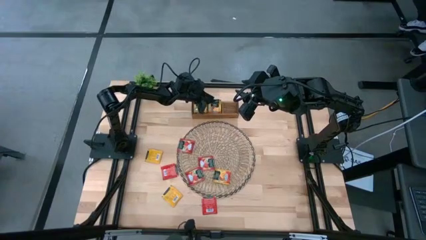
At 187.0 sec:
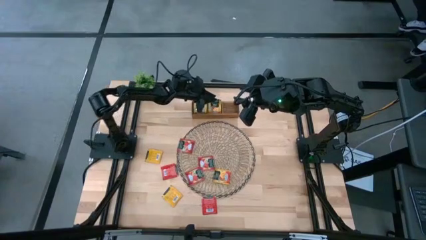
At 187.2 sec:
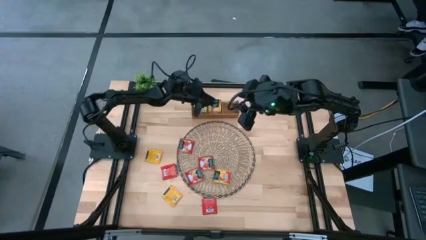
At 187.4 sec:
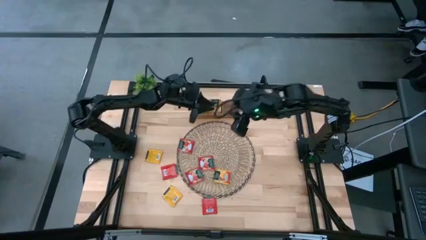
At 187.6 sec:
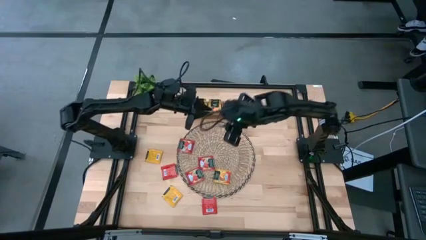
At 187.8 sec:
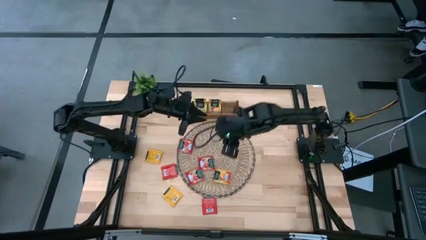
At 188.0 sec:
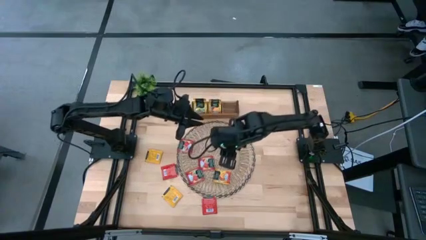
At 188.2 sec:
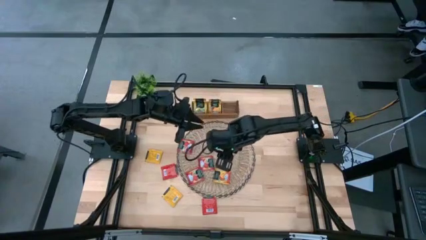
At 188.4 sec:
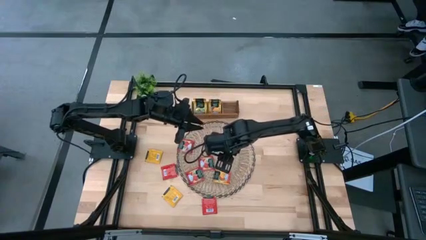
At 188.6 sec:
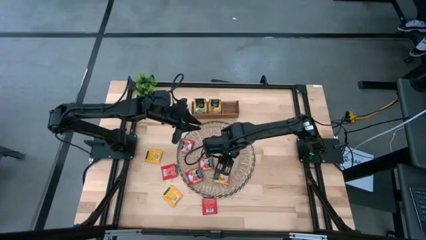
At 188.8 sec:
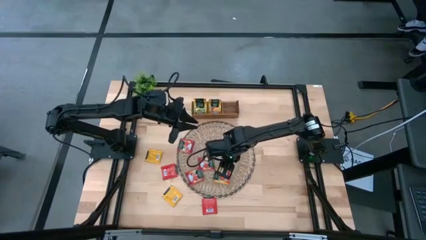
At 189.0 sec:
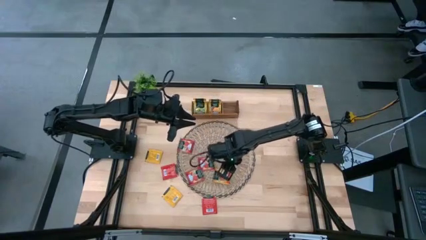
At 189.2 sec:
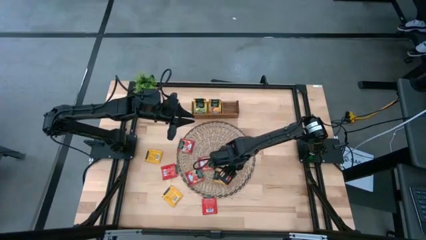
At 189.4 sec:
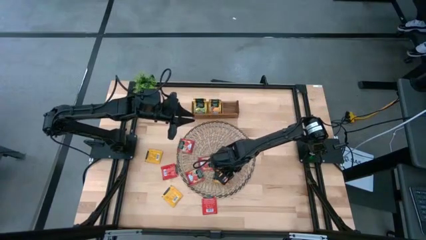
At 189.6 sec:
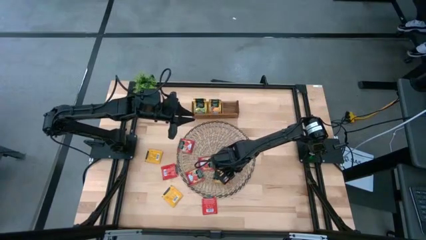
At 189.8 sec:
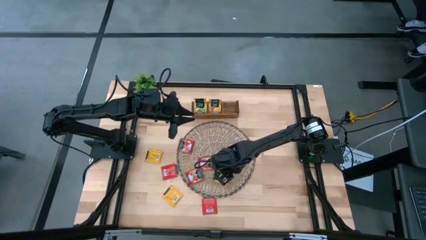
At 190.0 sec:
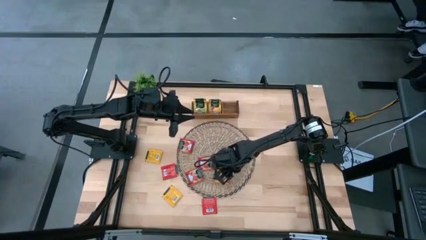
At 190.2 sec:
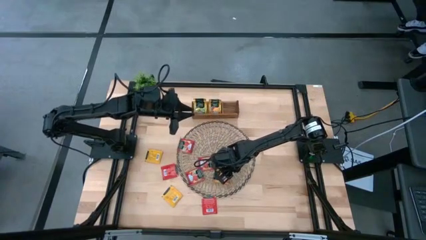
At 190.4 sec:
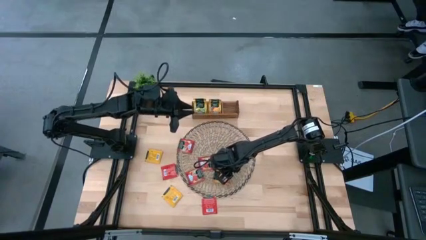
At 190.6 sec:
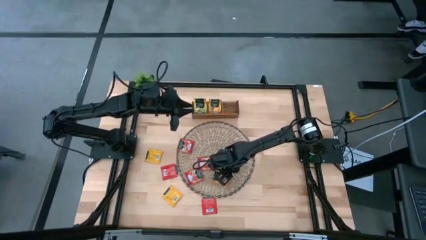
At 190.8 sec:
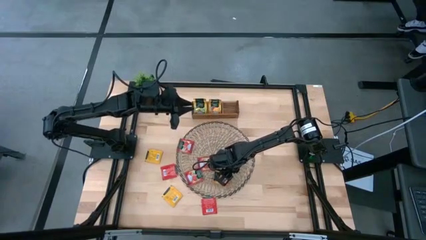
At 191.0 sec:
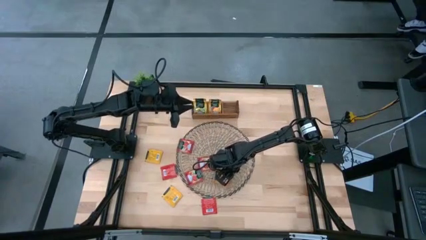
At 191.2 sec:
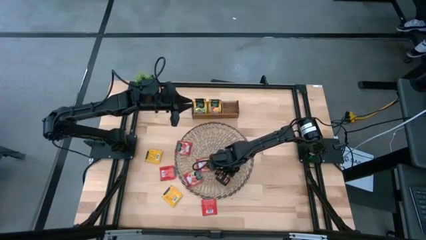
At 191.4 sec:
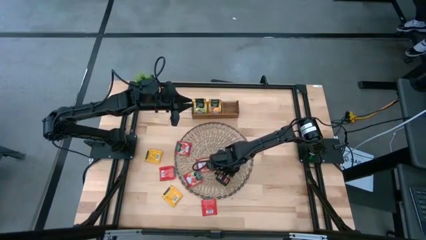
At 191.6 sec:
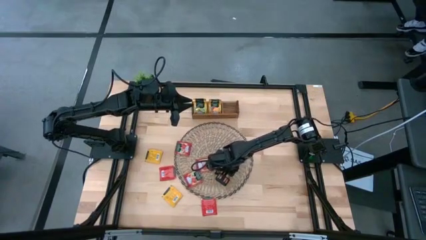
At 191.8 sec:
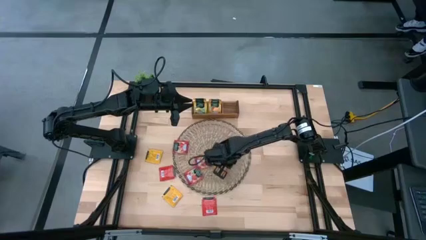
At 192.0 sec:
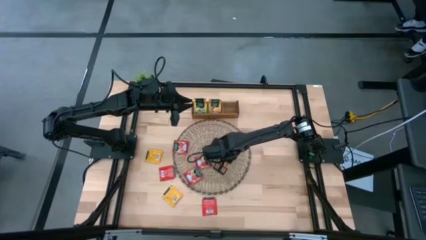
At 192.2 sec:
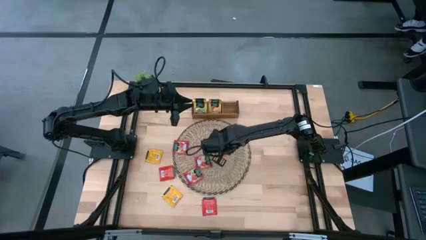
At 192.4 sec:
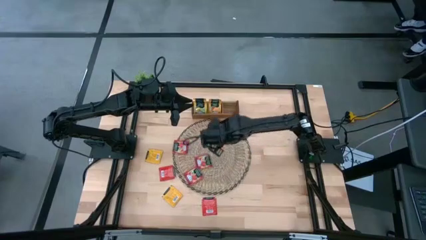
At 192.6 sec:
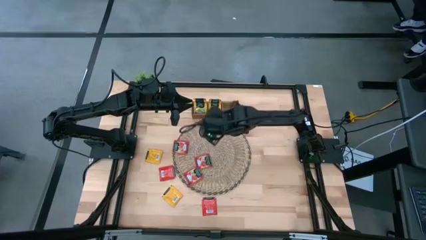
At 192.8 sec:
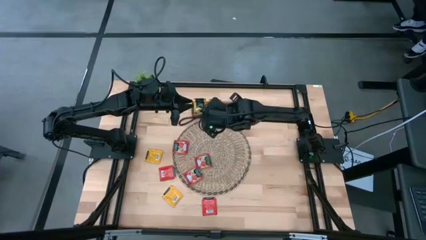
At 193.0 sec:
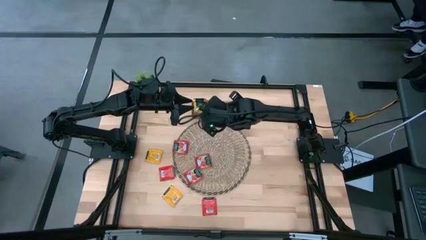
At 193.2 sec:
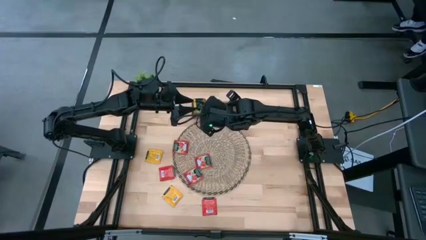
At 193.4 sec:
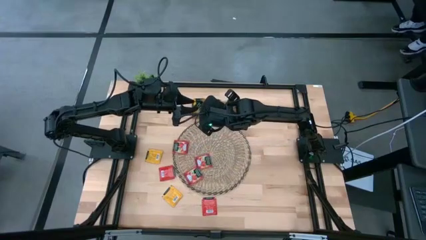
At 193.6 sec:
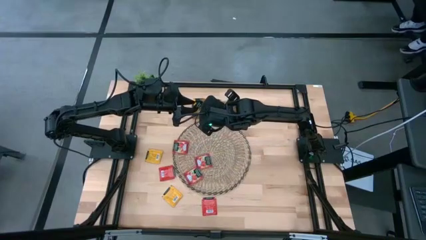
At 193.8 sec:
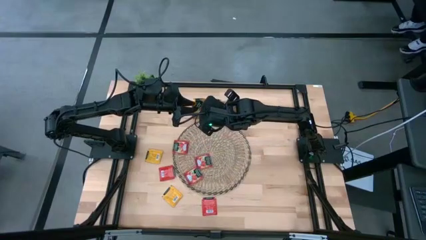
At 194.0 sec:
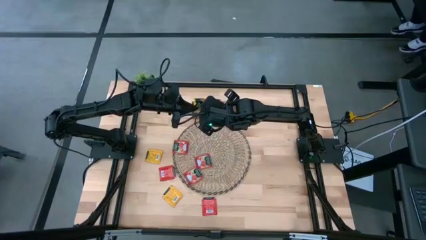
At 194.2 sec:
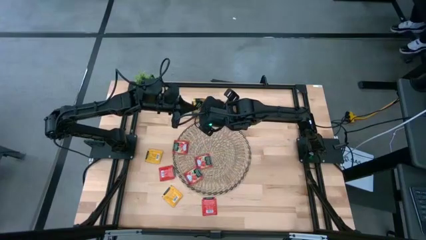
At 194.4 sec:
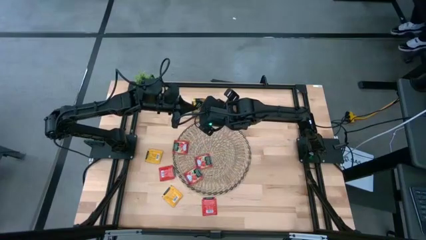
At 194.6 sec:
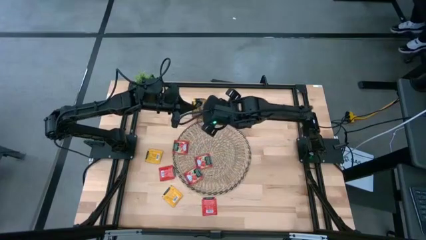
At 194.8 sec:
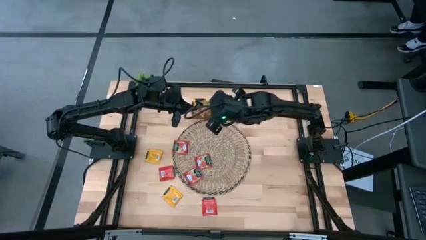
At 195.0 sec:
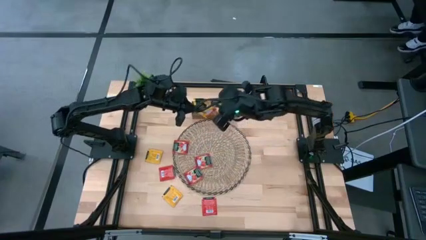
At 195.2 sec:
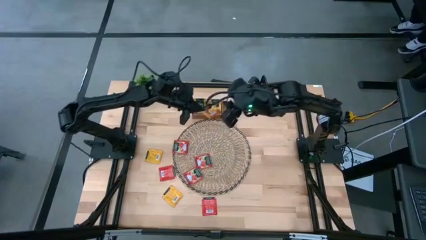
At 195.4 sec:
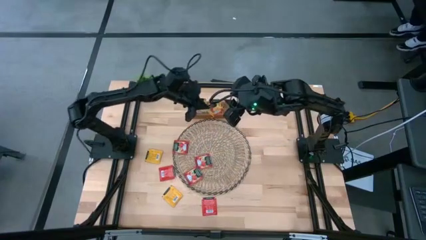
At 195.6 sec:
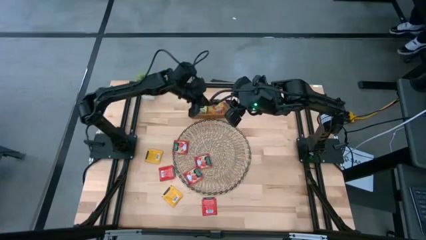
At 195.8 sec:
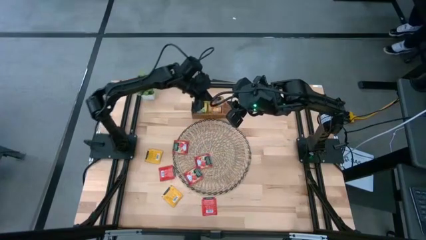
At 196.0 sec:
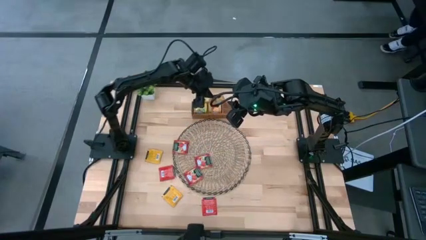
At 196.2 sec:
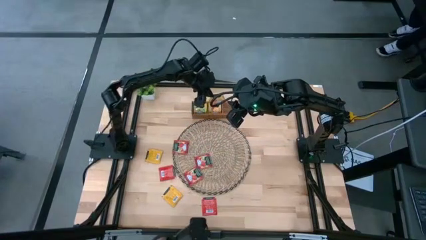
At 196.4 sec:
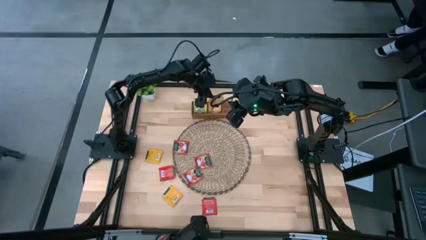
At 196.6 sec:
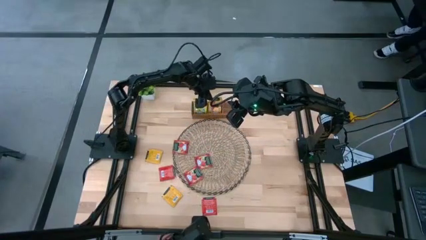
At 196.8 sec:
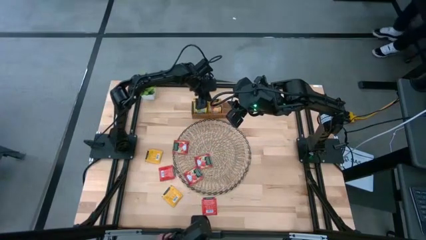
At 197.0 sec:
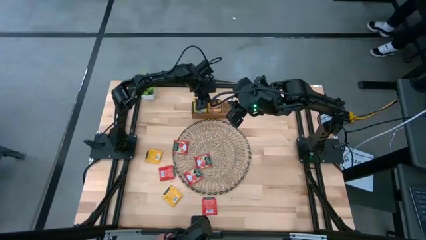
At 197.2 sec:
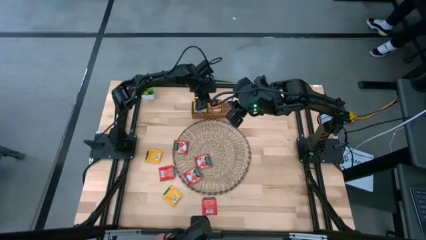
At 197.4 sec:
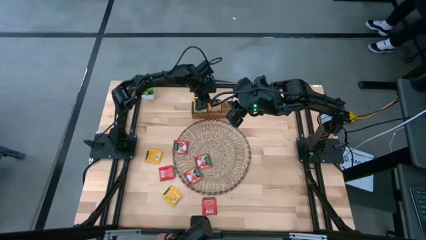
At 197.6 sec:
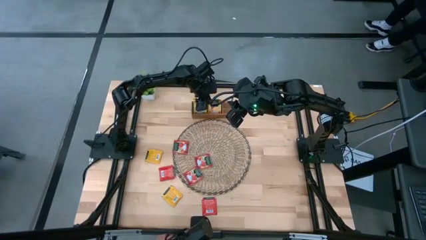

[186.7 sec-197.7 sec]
Task: Pick & Place Tea
Put the right orange tea bag into the middle of the wooden organizer
